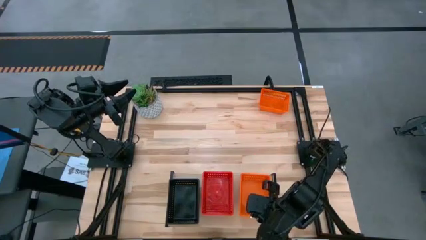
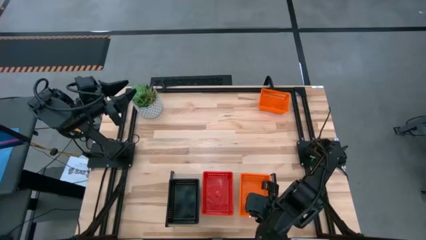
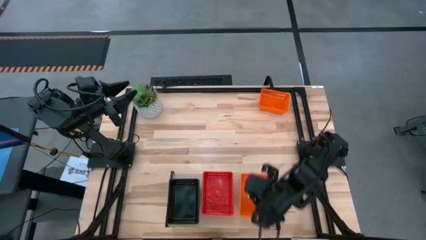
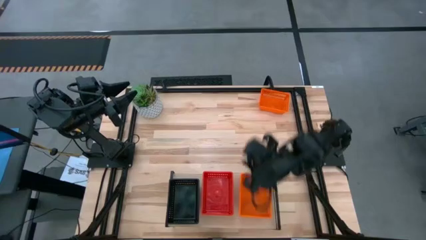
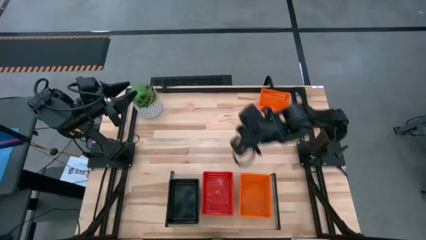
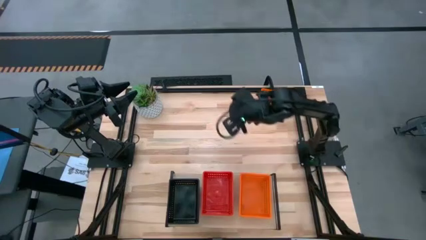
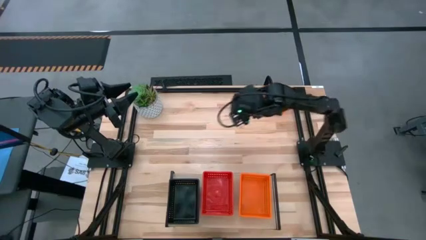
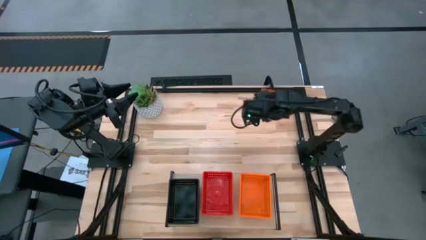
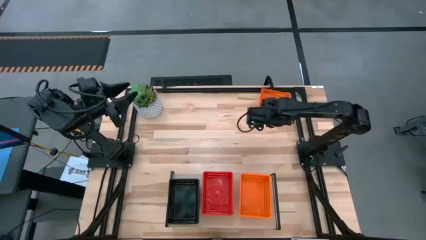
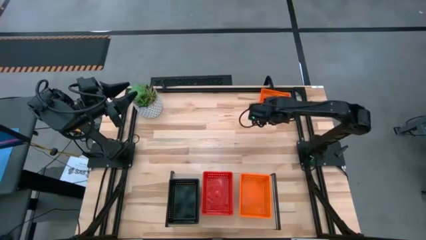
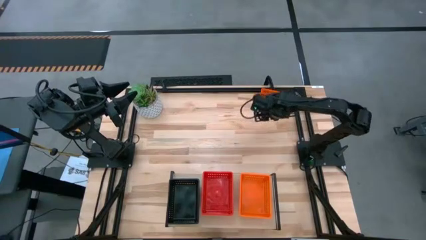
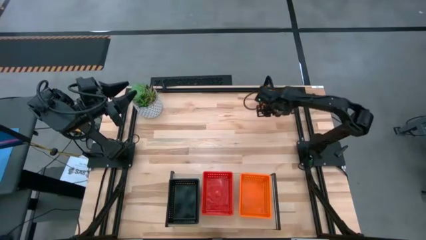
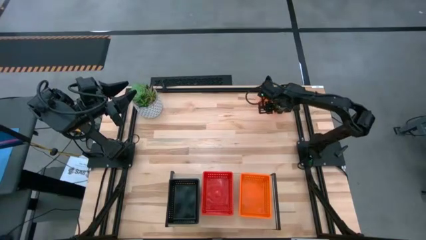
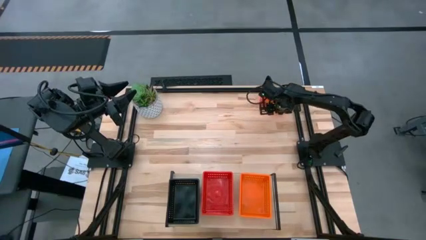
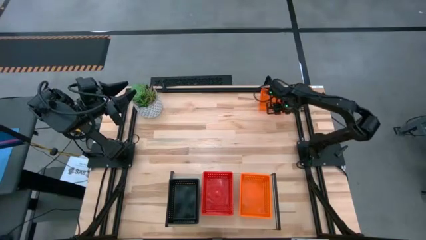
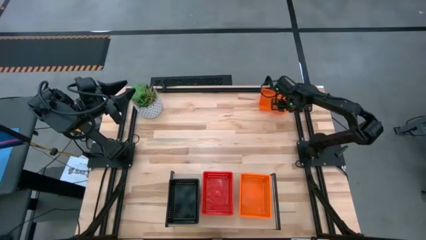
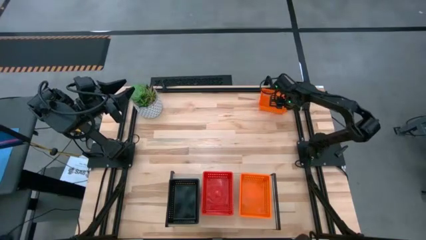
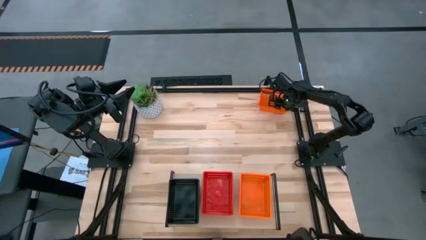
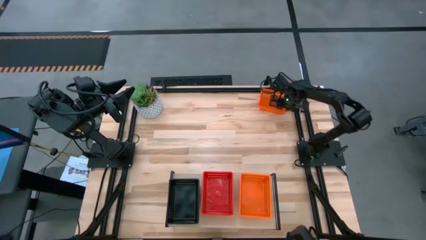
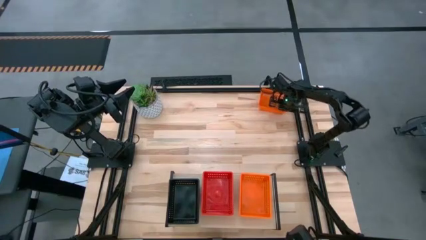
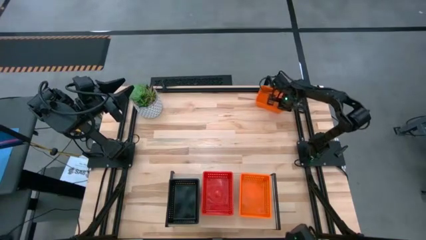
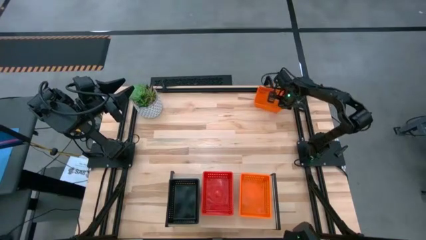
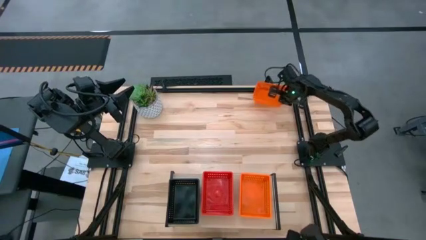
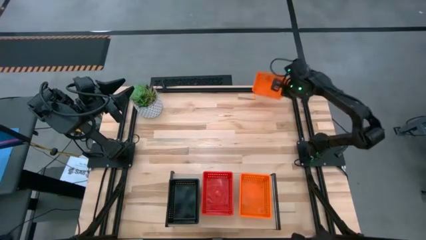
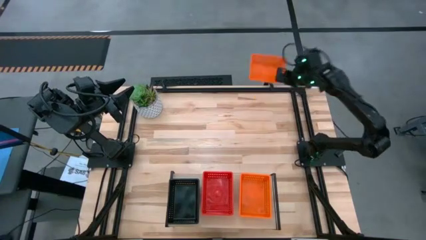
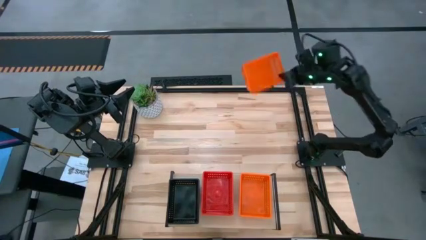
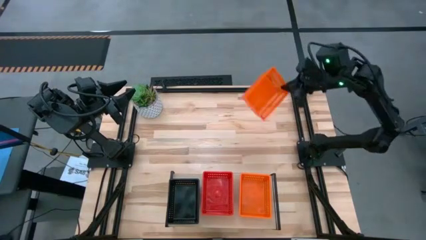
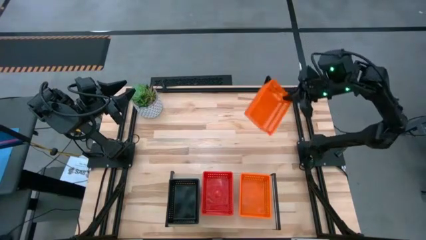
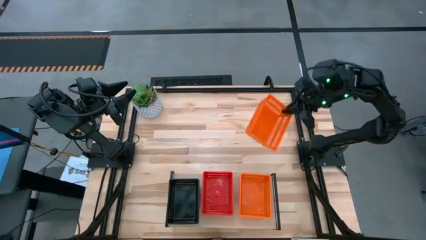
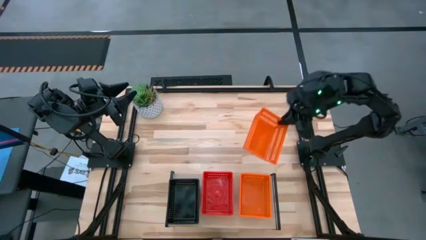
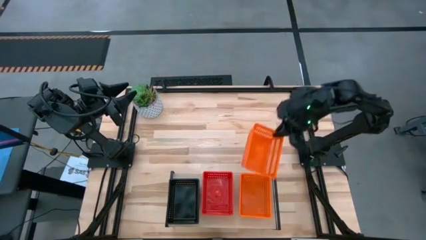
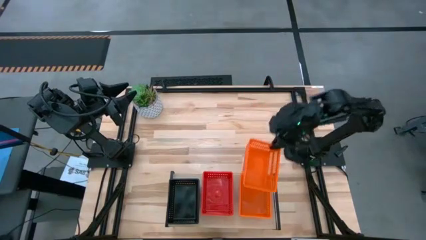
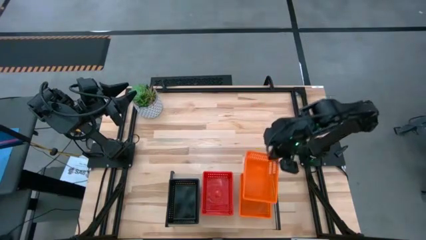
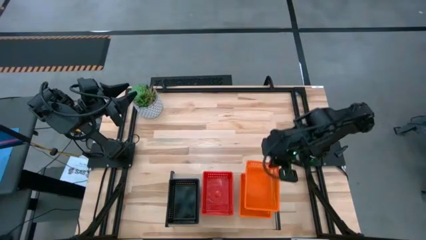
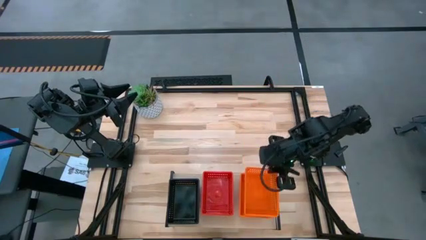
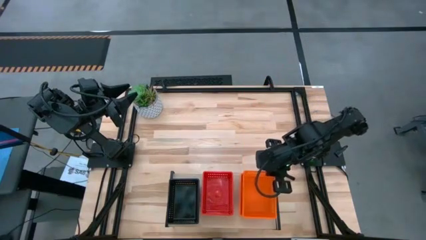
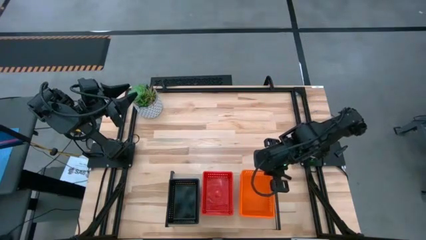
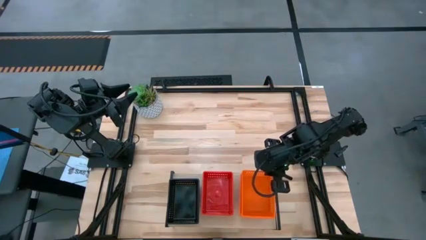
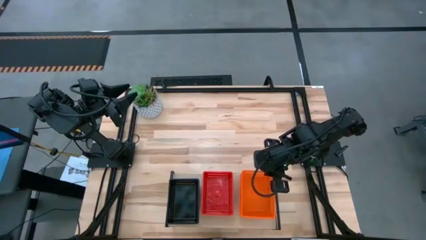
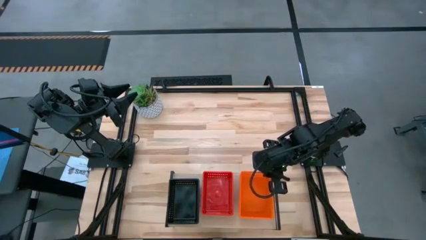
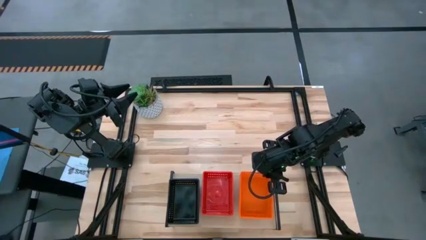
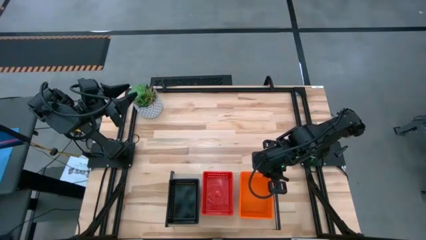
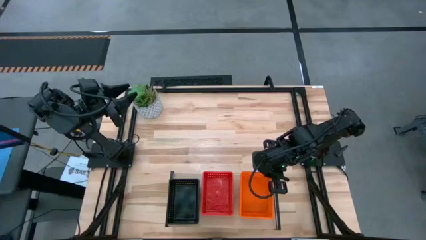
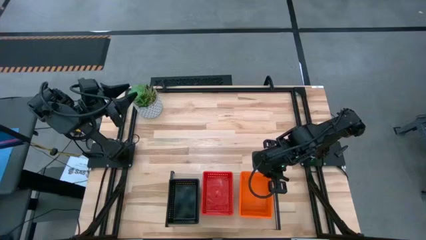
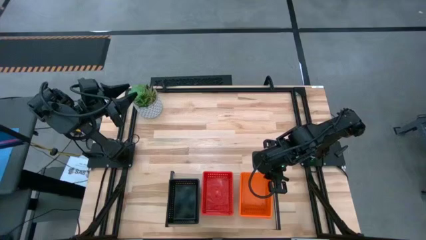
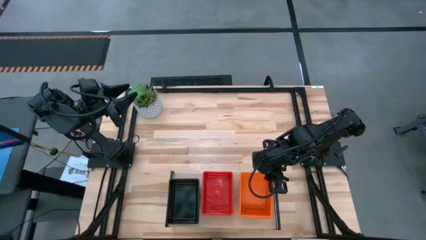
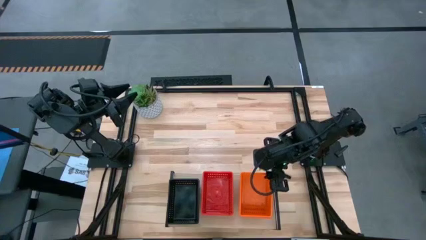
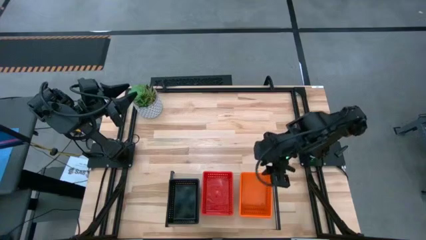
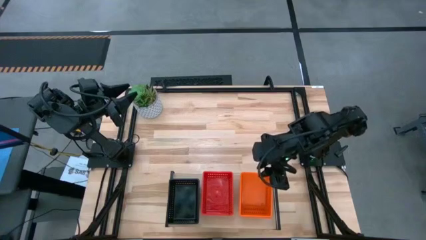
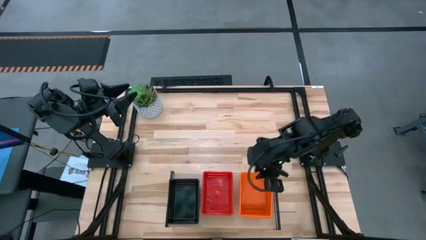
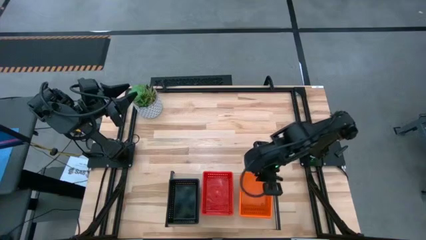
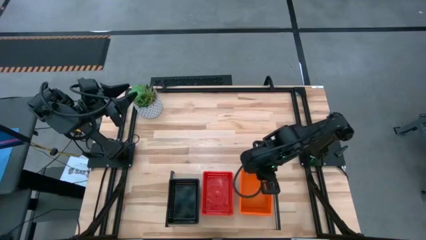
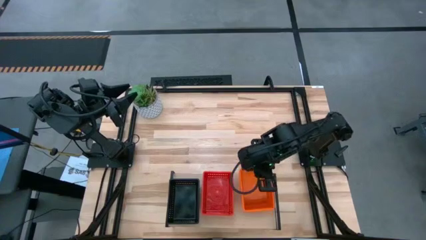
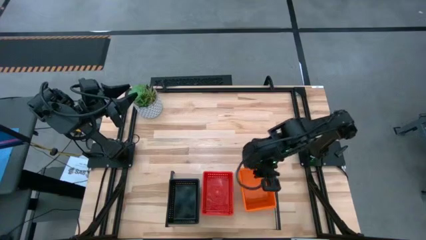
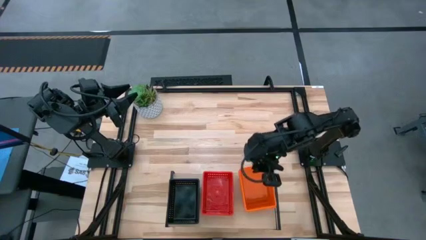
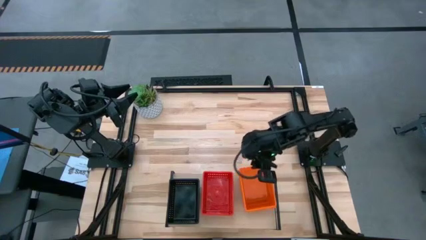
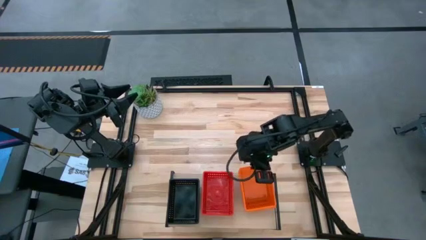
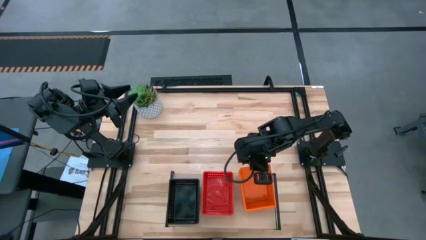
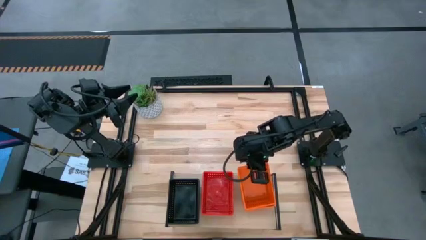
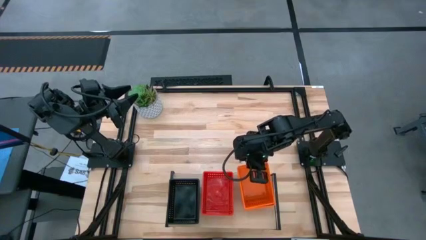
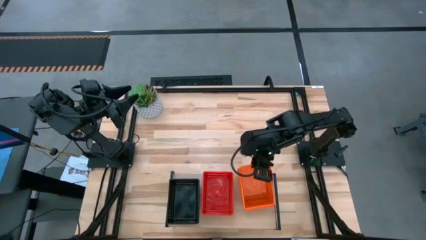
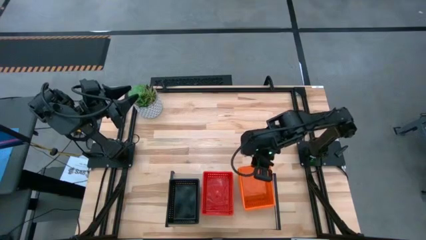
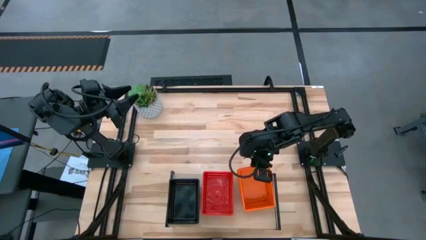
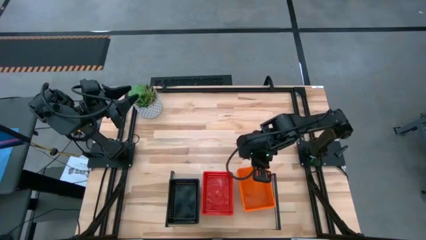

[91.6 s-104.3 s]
Task: Stack baskets on shelf by color
Stack the orange bin on the top of the orange bins on the shelf
